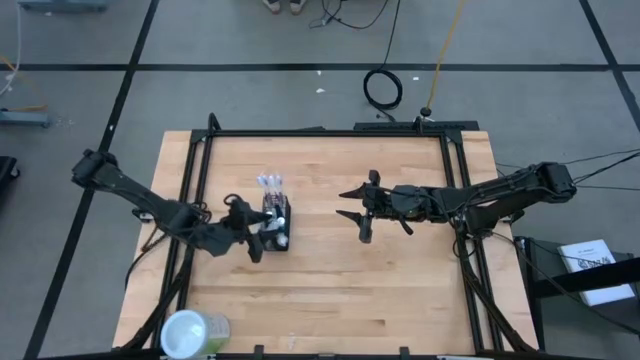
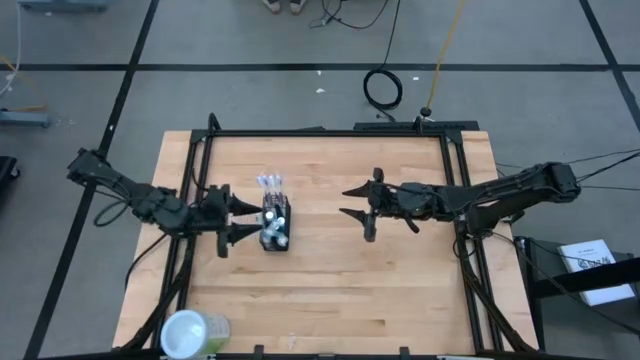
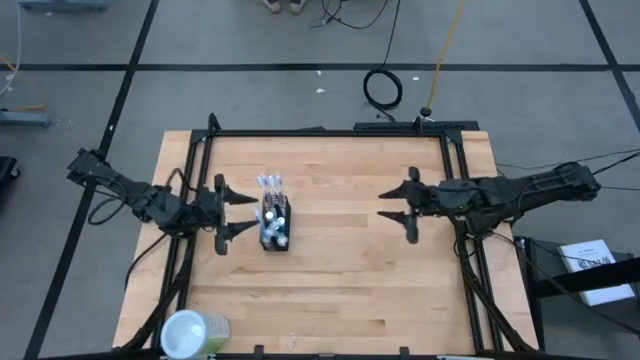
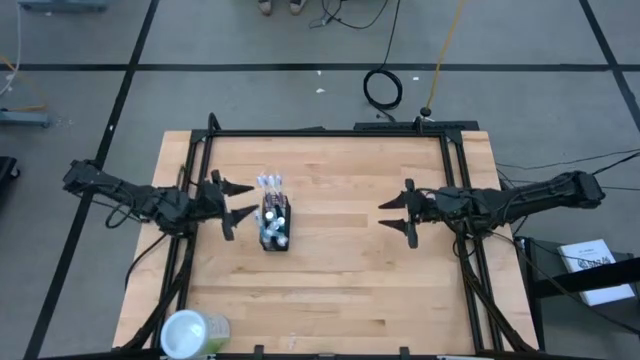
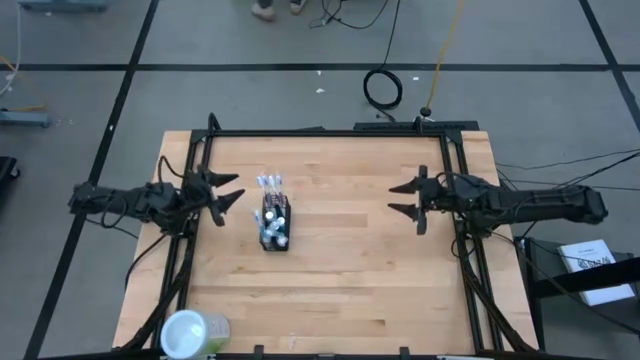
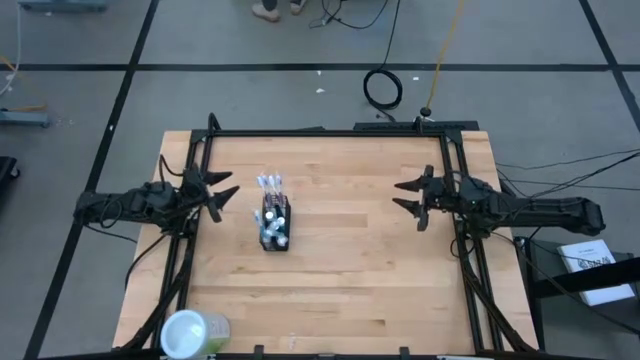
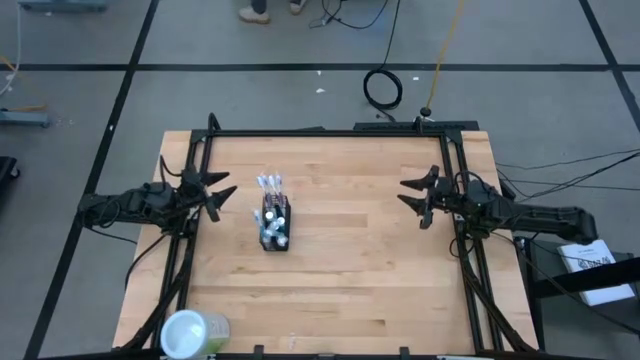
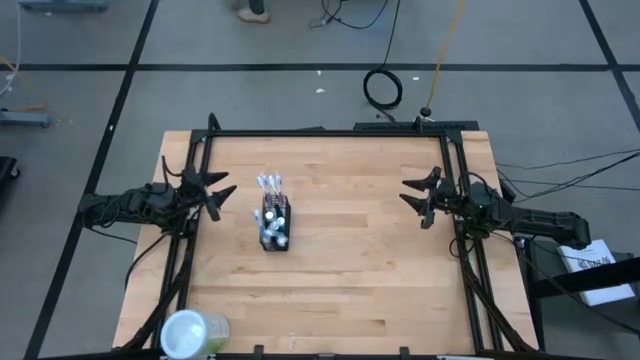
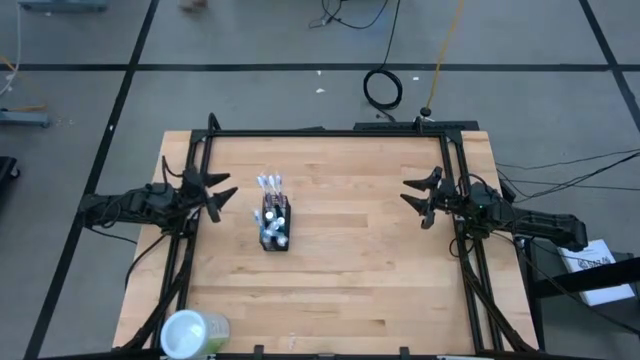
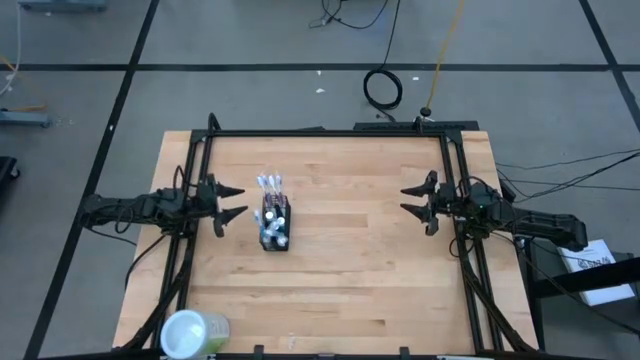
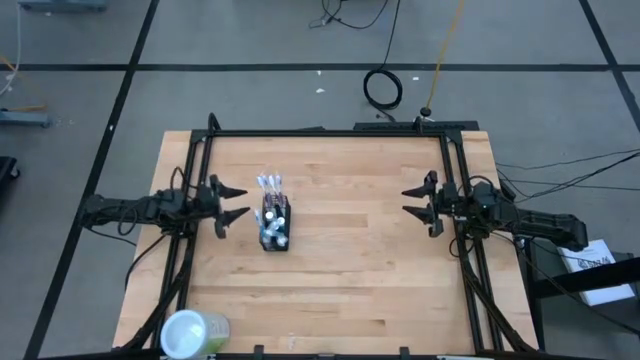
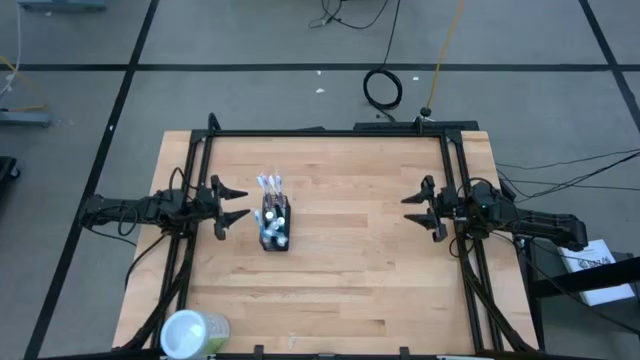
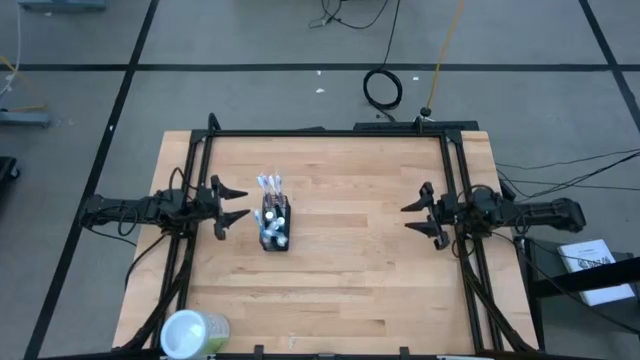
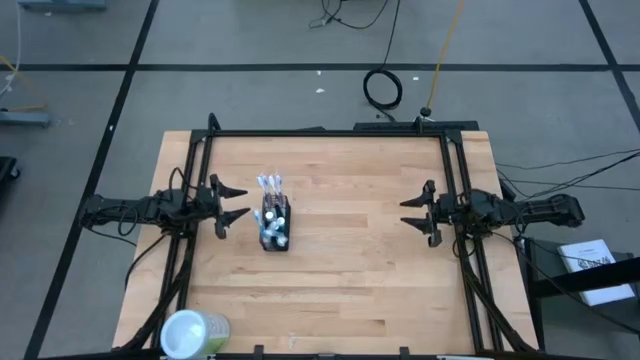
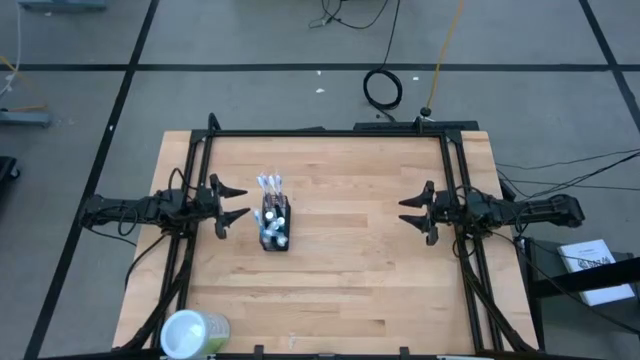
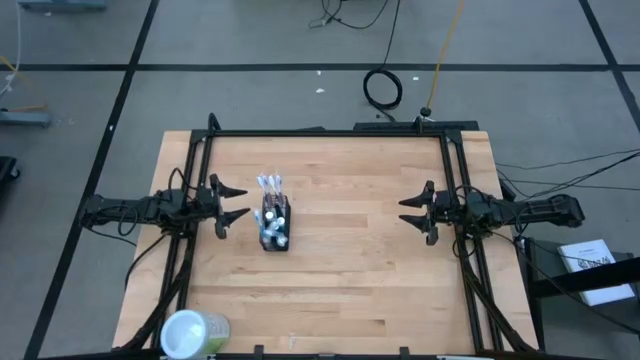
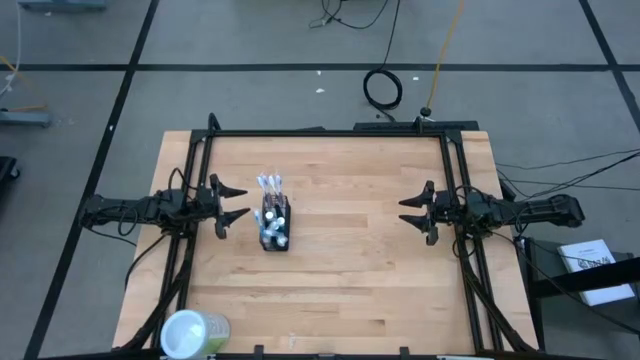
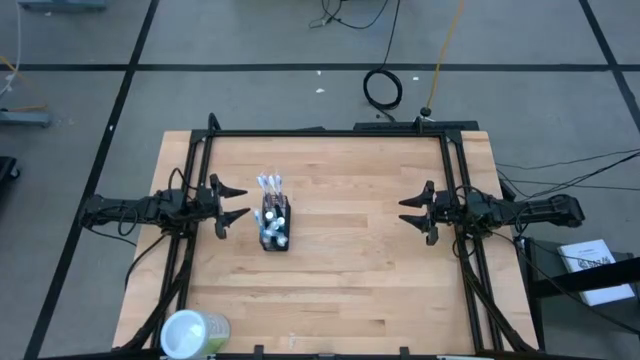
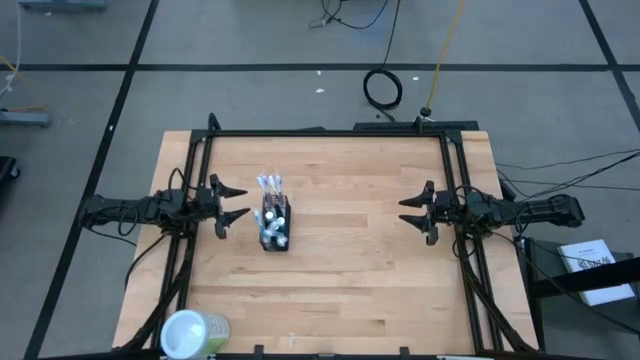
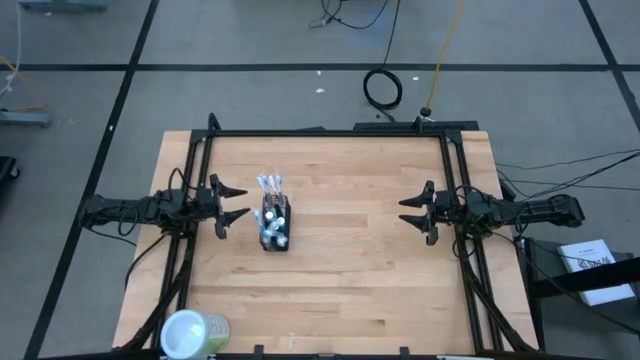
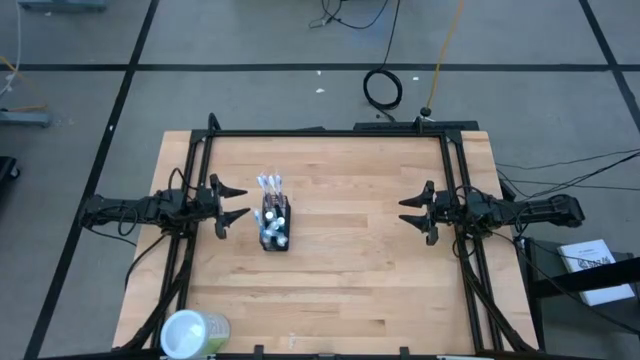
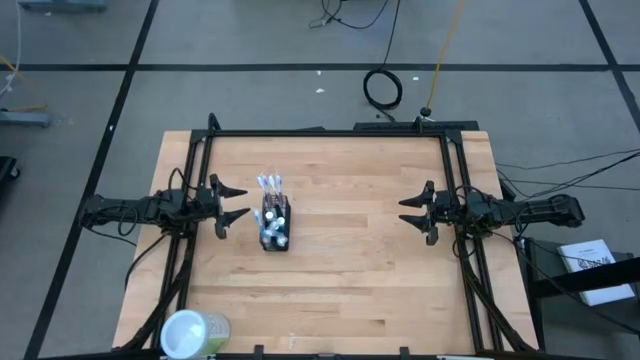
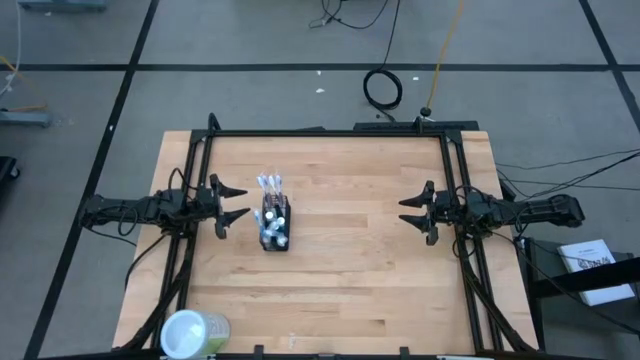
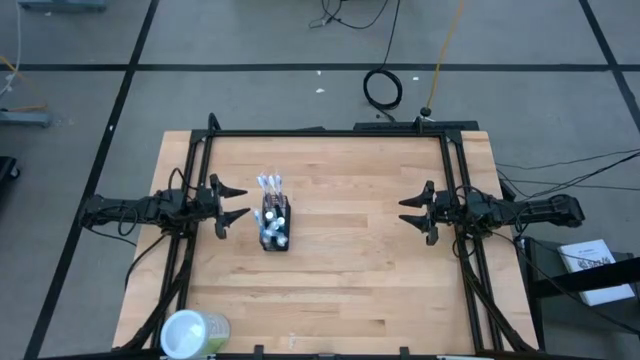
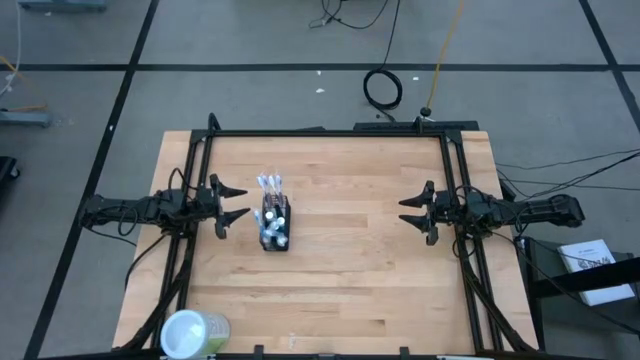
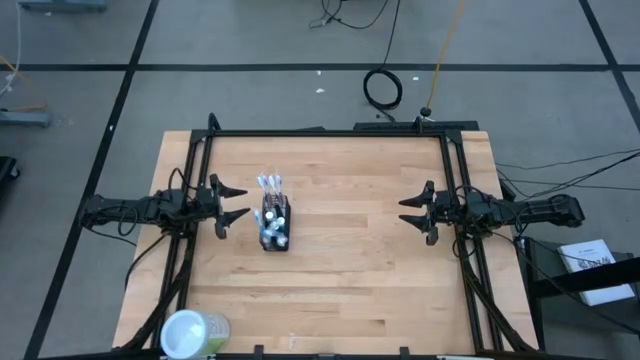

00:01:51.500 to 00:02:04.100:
Task: Pick & Place toothbrushing station
Return to Home Position

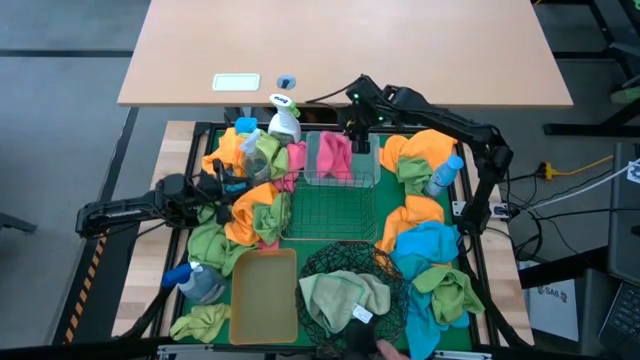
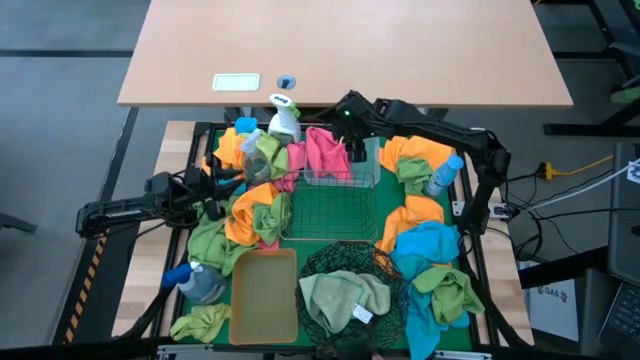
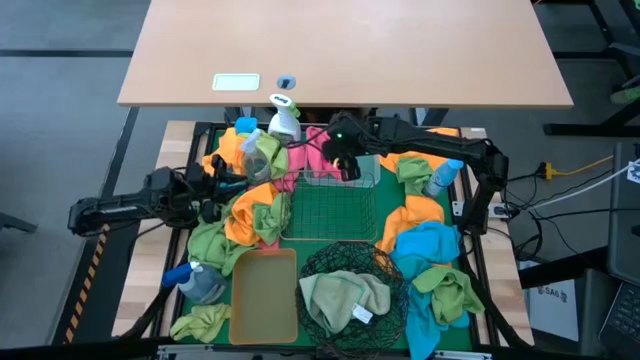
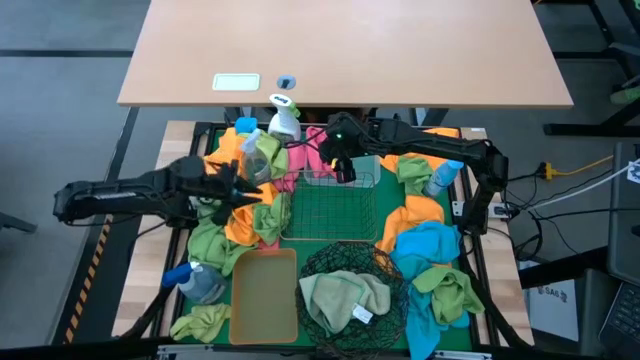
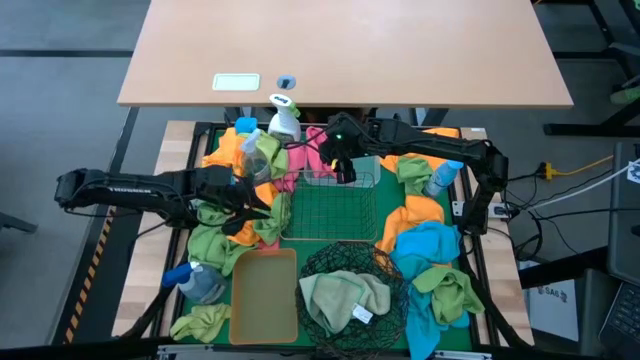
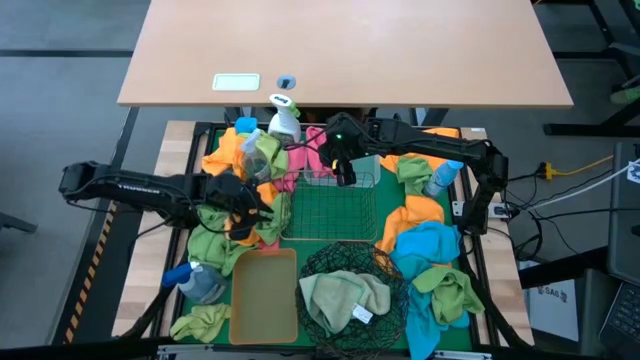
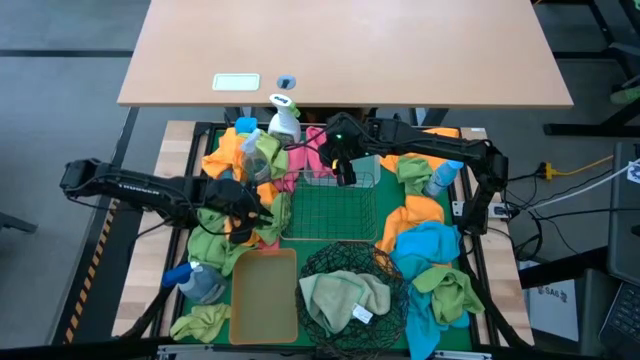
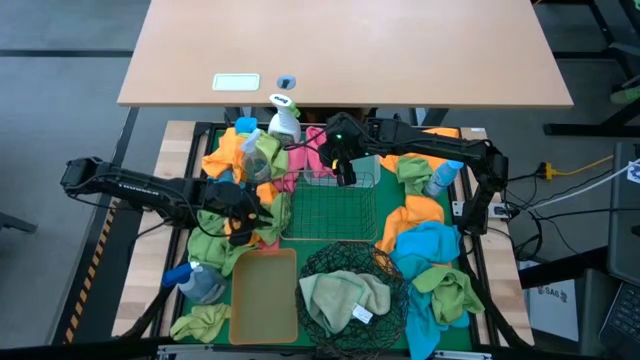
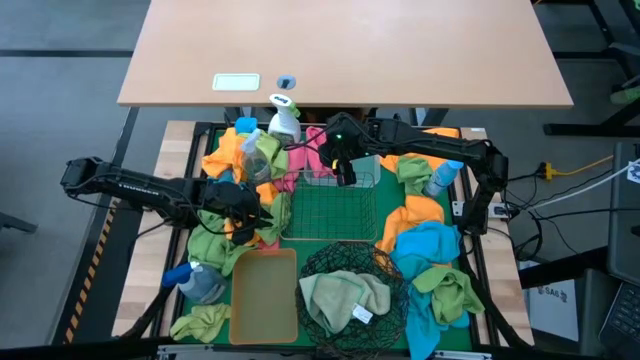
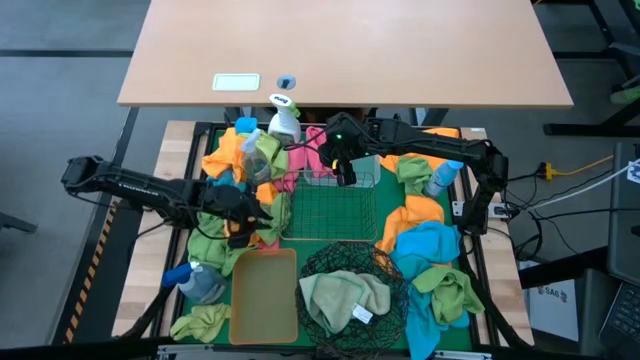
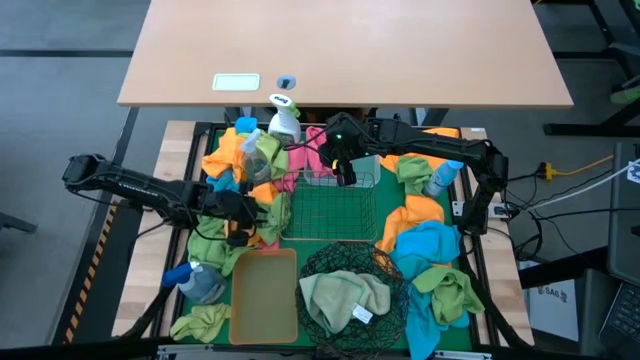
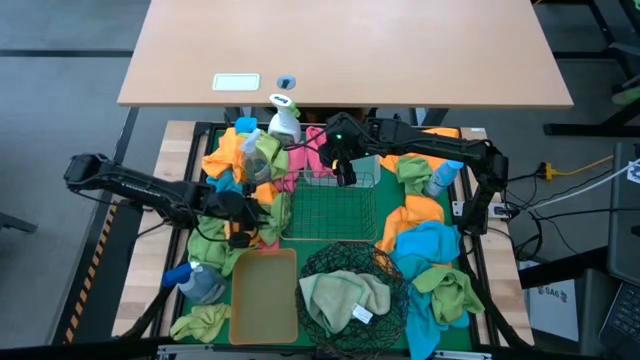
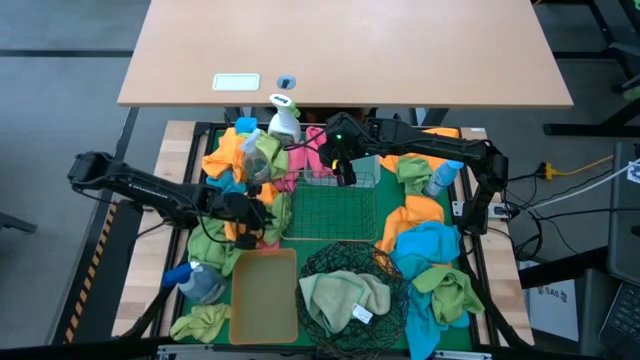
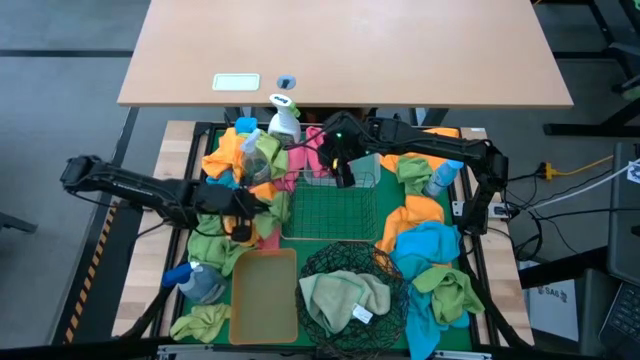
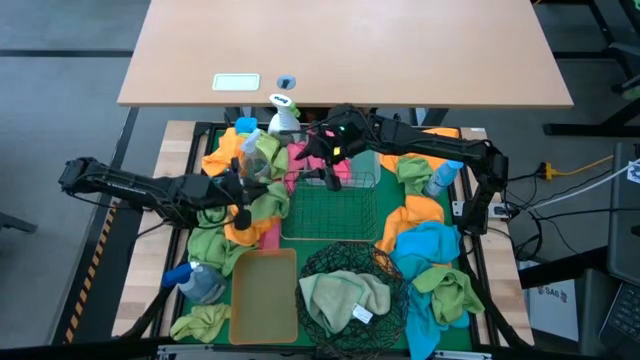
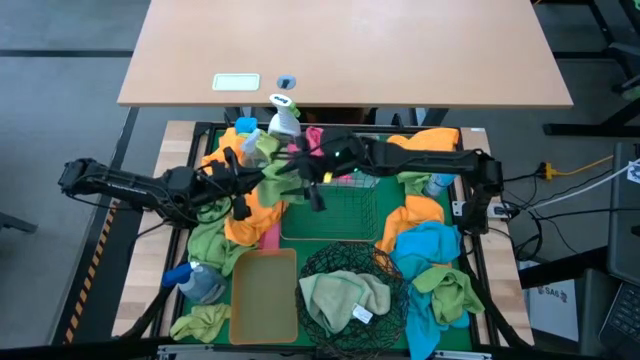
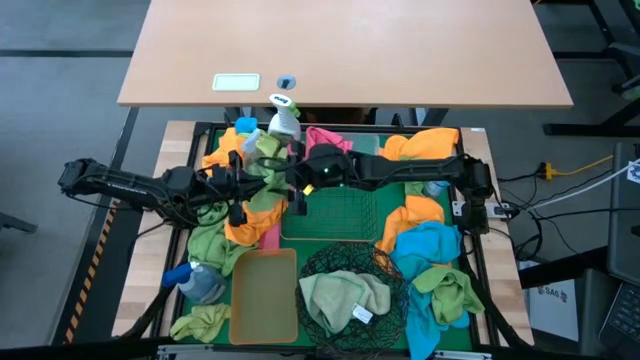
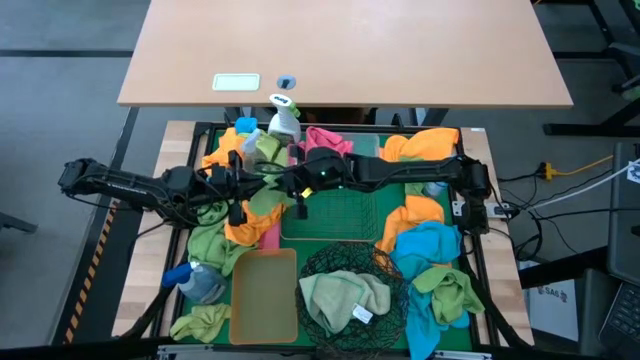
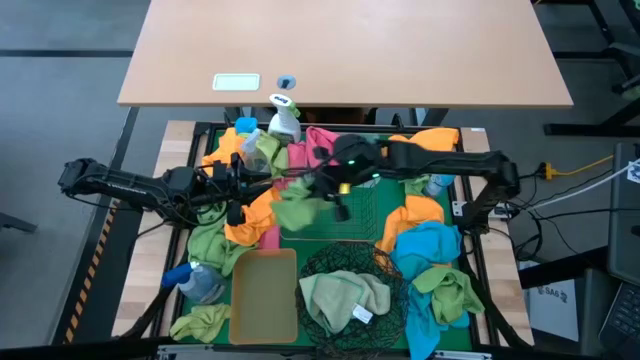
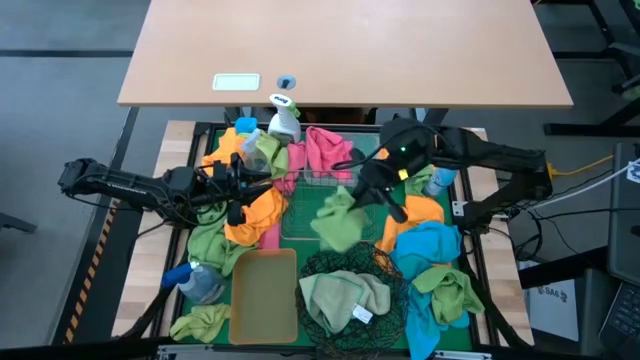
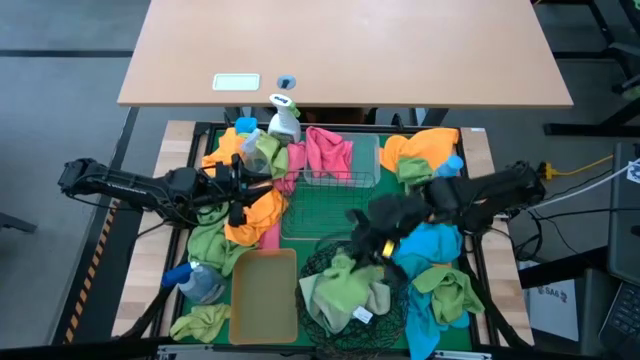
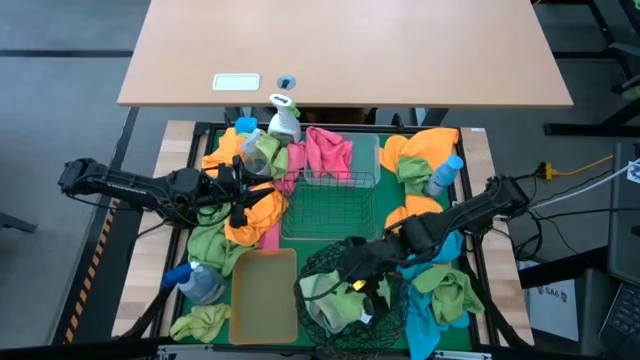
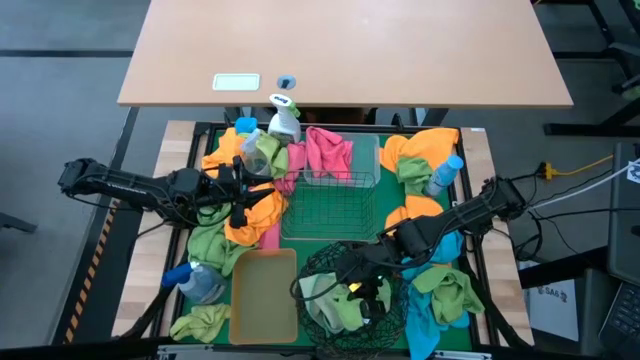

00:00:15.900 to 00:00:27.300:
Task: Sort microfiber towel by color & place in baskets
Put the green microfiber towel into the black wire basket
